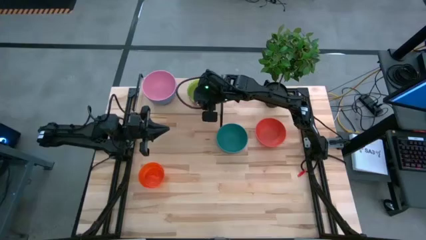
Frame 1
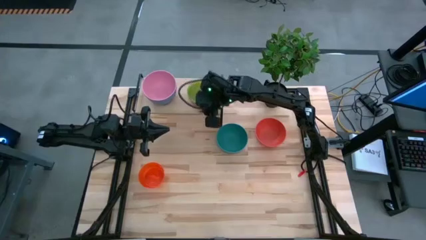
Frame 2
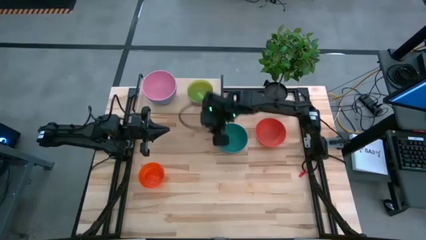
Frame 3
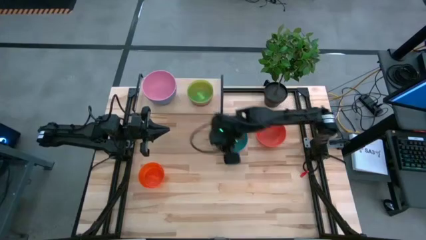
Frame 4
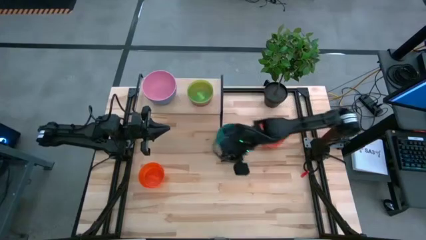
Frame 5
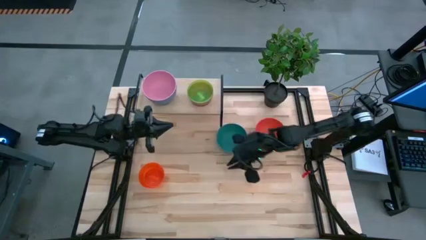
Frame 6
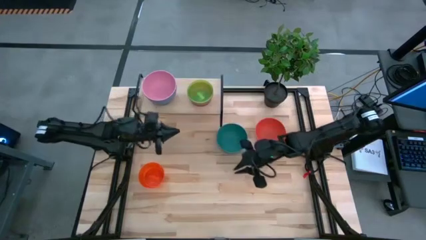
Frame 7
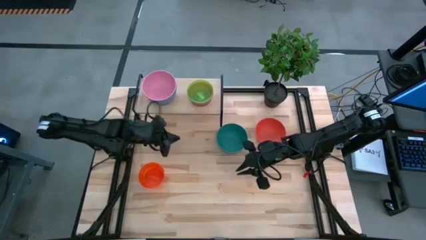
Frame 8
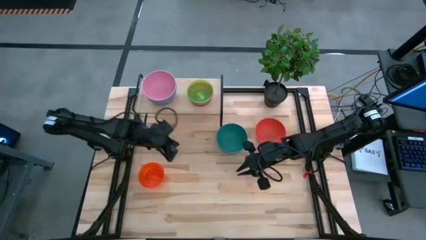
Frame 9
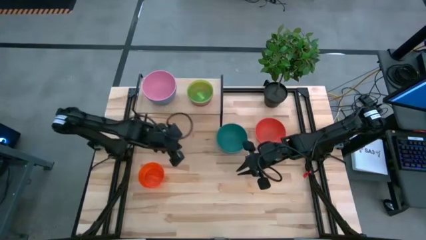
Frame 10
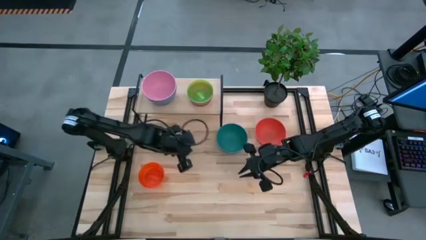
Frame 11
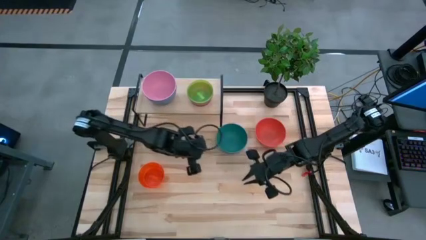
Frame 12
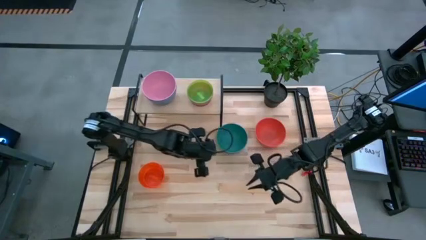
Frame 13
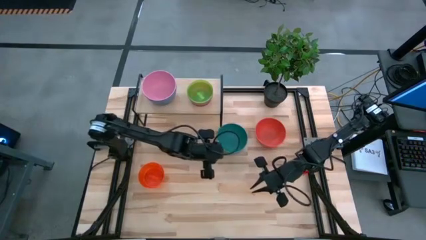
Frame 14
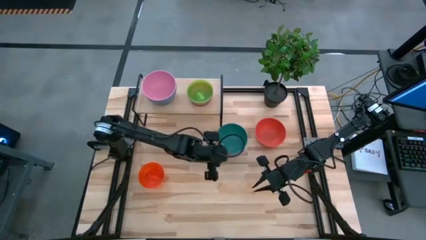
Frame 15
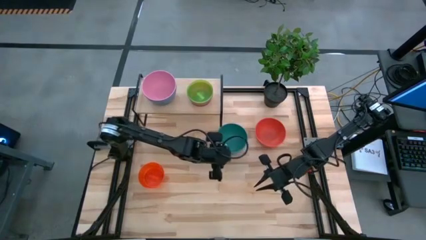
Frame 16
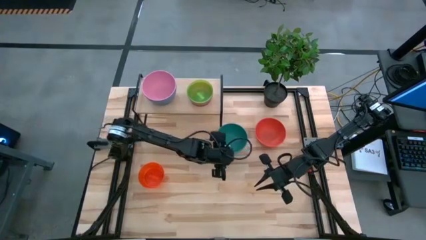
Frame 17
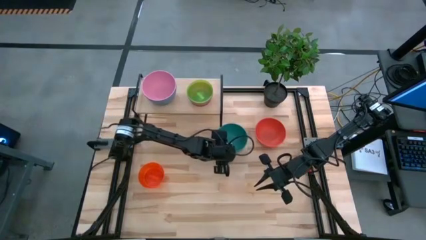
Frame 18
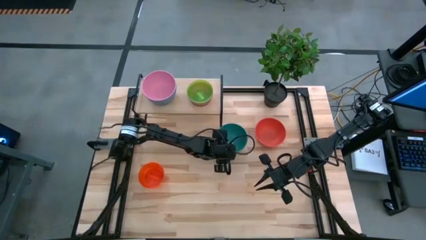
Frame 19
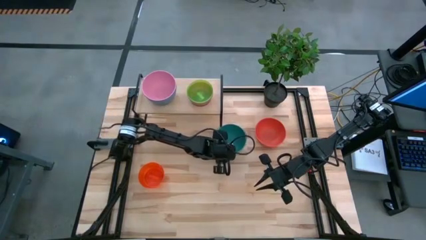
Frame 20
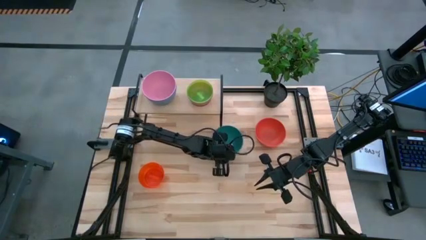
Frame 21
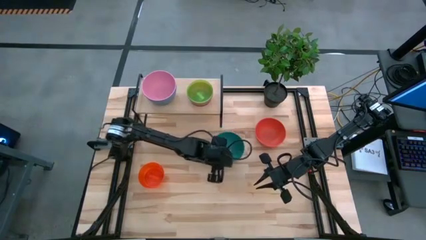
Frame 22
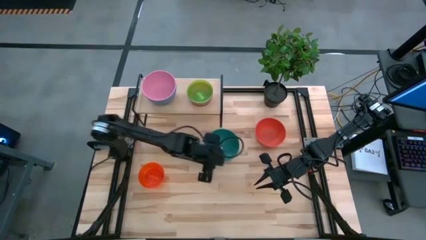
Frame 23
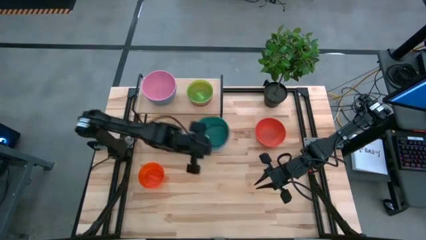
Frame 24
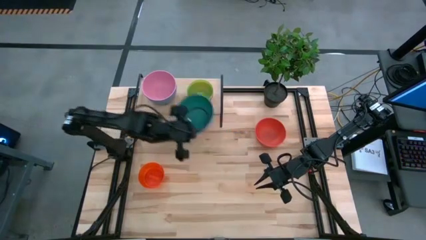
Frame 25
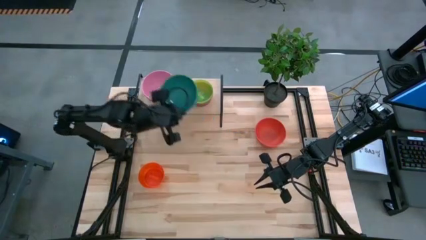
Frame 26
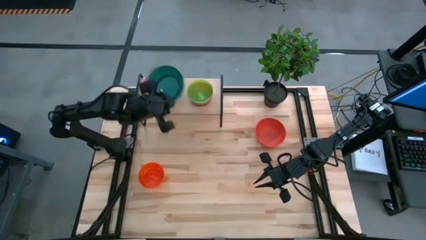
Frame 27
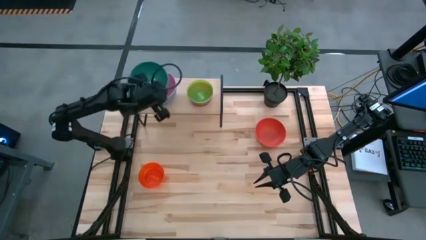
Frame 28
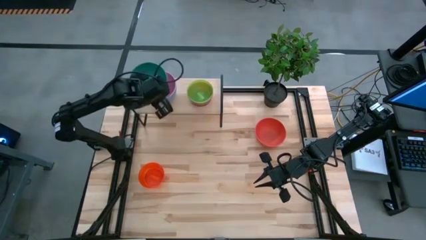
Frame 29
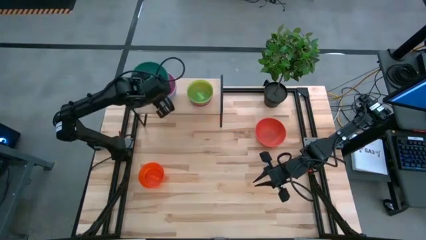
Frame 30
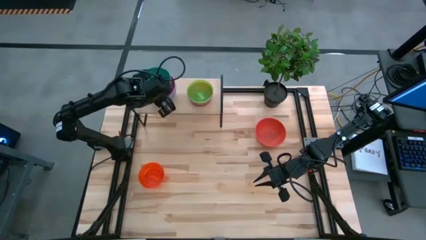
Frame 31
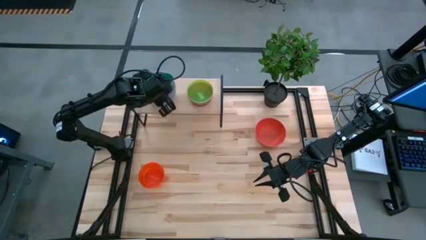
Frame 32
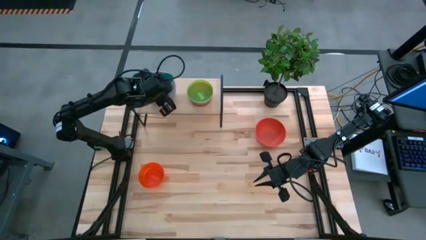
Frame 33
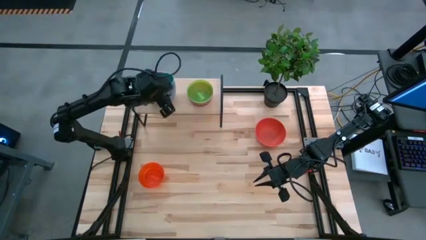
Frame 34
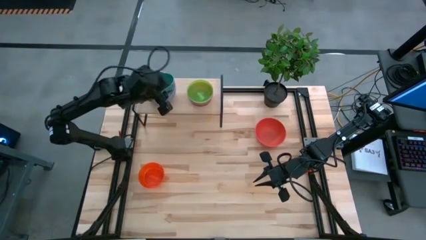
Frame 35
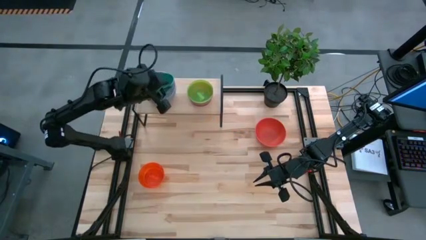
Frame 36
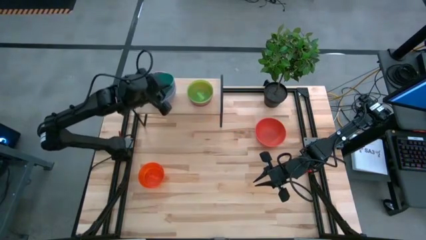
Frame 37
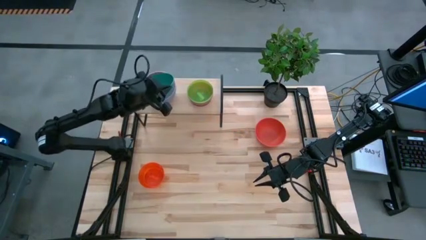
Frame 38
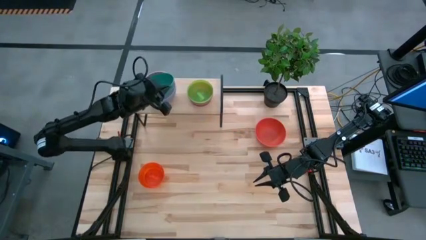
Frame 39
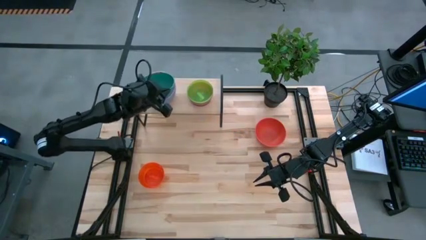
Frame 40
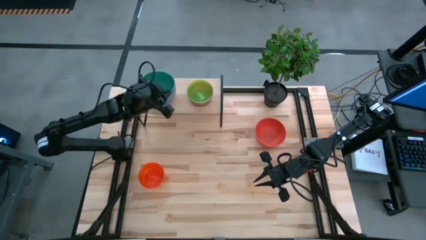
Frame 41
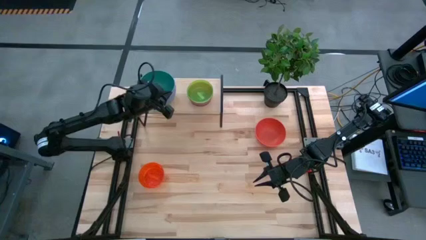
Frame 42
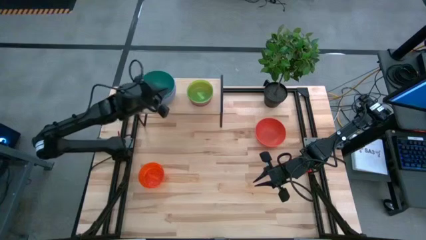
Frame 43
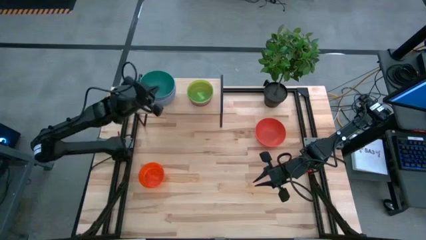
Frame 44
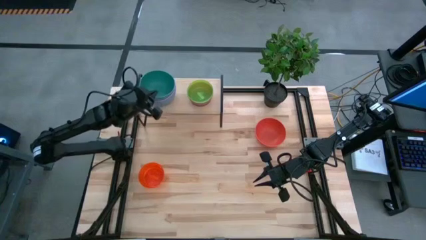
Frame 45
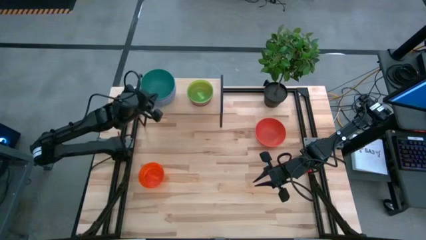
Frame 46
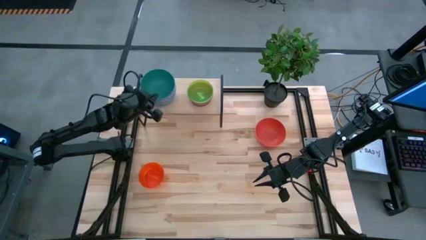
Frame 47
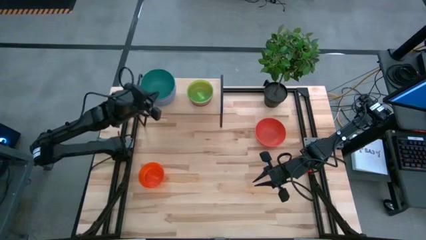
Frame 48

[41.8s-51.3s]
Task: Place and stack bowls onto a shelf
Stack the dark green bowl on the pink bowl on the shelf

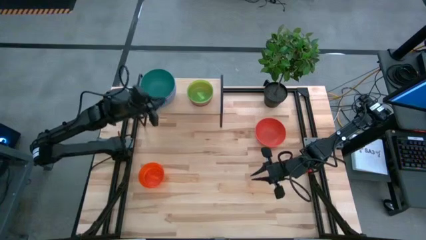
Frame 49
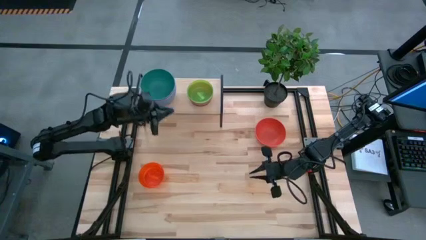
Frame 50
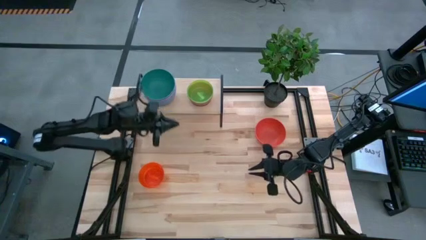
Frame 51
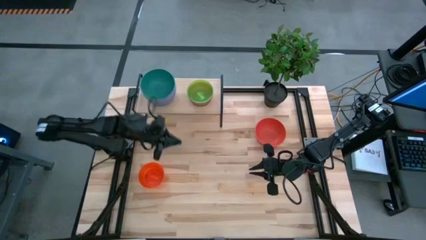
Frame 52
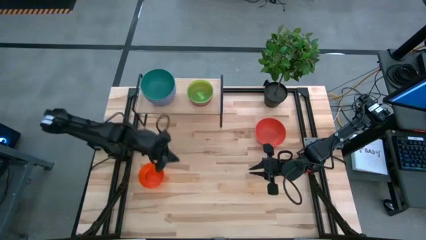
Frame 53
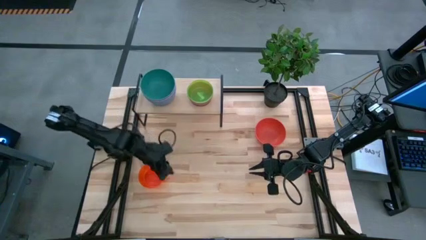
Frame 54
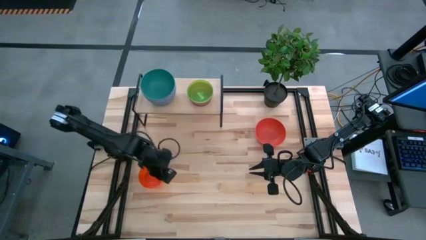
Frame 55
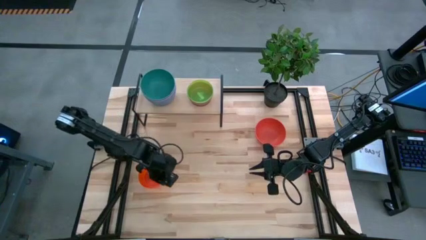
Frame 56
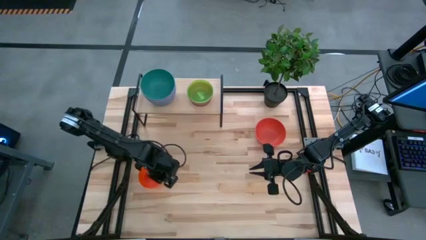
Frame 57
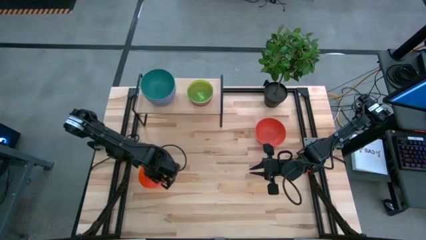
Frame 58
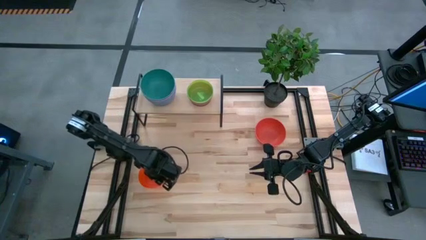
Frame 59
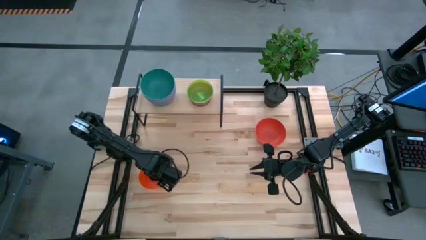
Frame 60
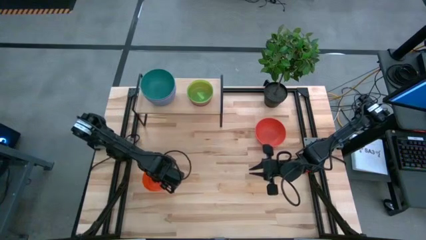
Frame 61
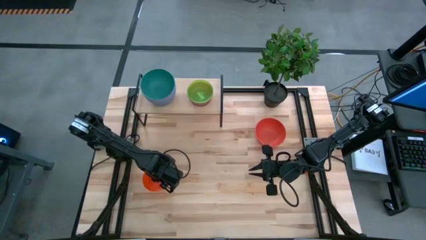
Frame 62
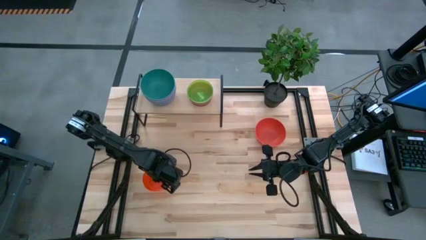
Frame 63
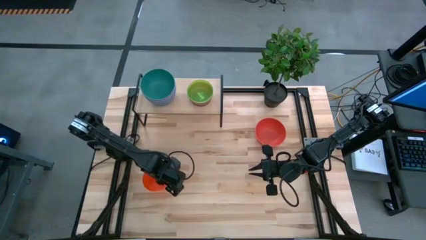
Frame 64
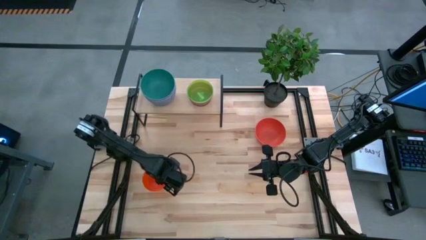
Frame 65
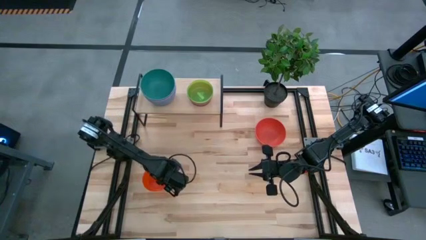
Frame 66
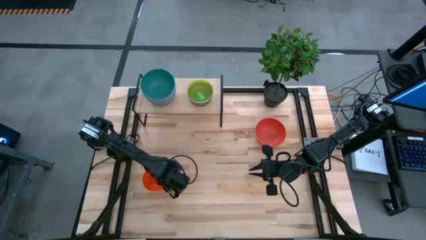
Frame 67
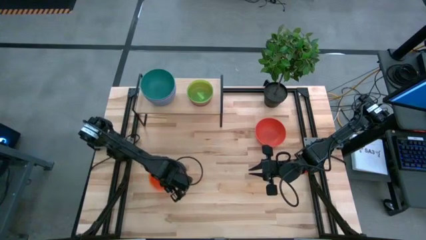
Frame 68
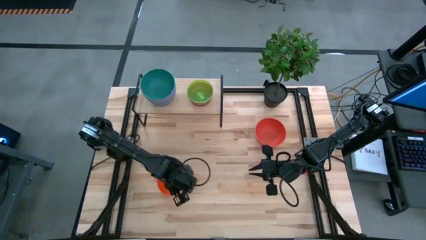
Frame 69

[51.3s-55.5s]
Stack the small orange bowl on the green bowl on the shelf

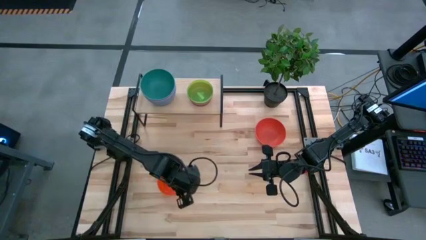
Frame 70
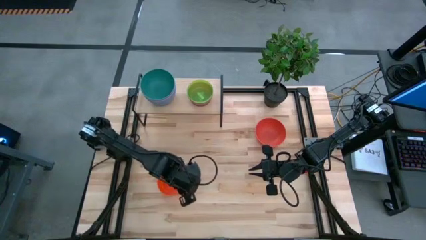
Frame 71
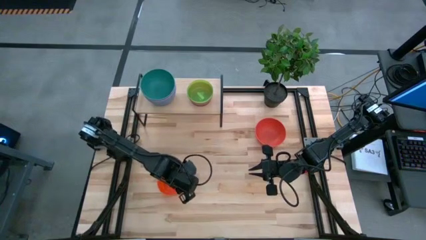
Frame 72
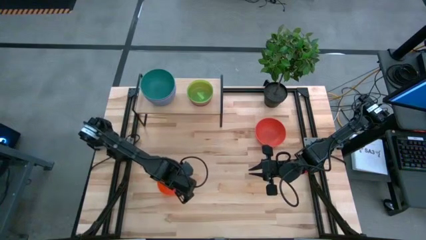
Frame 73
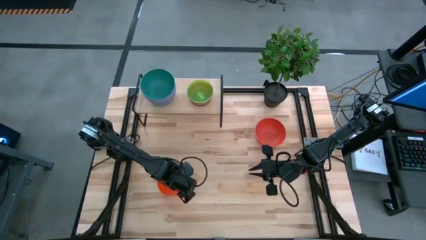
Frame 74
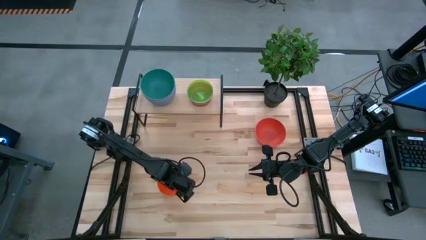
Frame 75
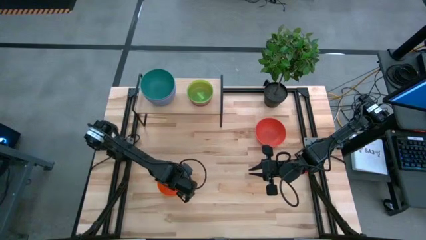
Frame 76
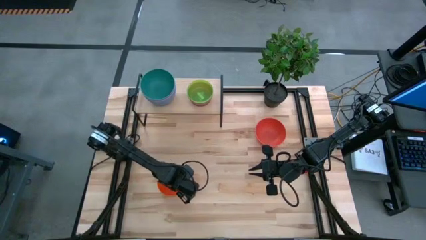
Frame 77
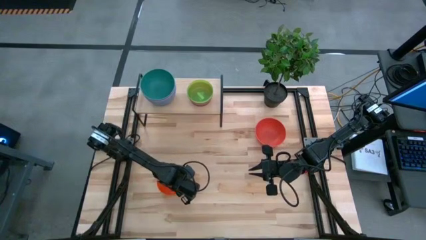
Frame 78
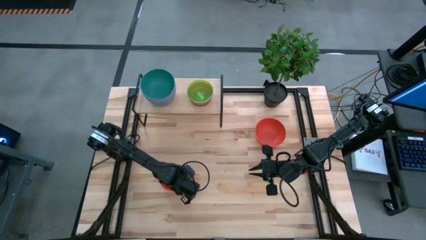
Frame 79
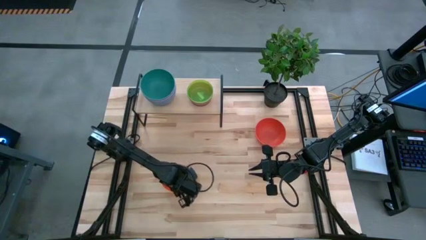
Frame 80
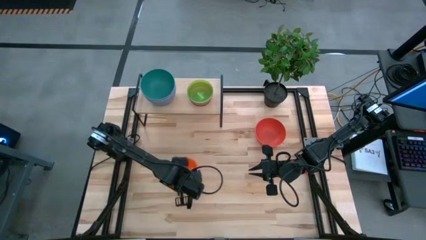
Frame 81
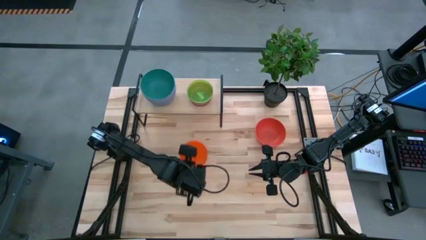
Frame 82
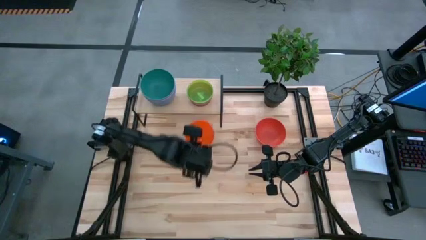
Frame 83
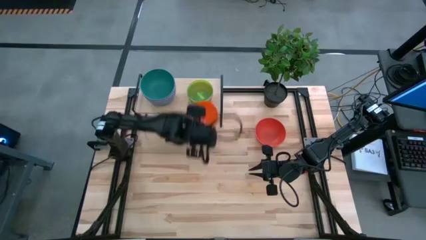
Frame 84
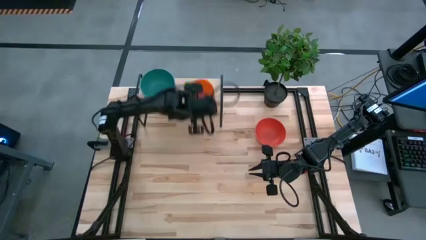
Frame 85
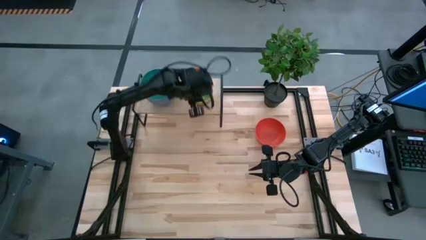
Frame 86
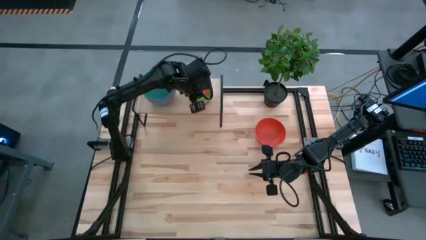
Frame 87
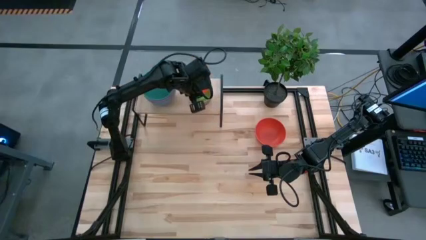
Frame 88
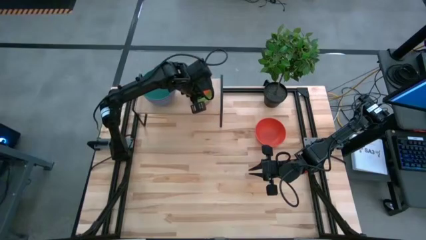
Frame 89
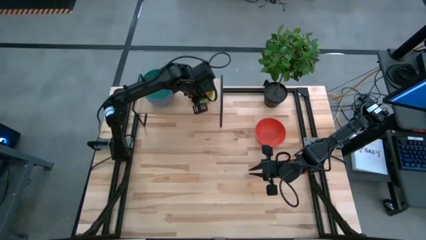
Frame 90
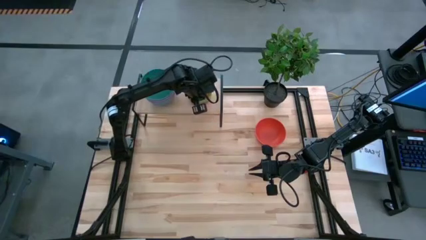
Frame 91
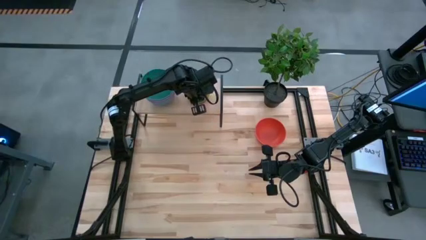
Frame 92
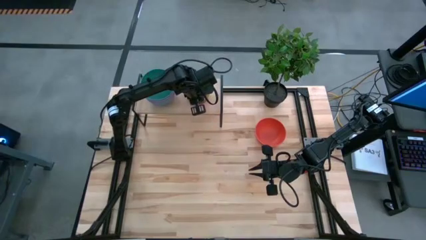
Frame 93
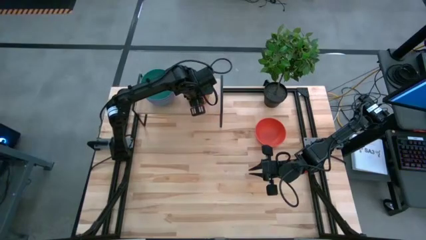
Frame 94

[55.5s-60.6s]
Stack the small orange bowl on the green bowl on the shelf
